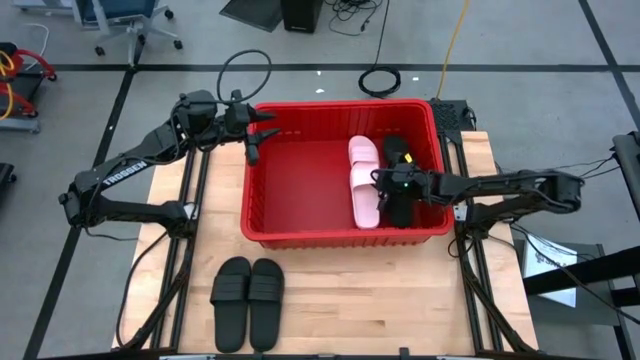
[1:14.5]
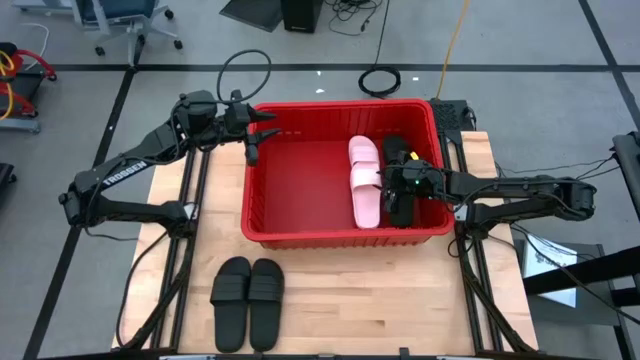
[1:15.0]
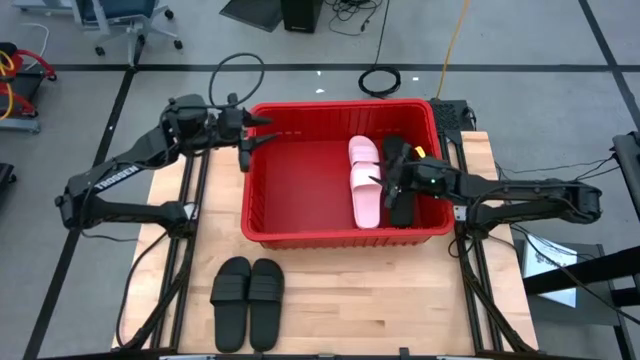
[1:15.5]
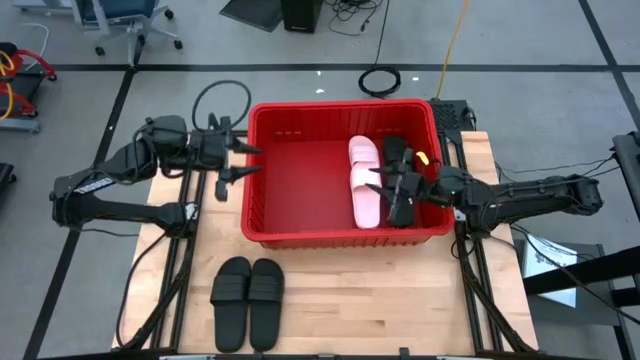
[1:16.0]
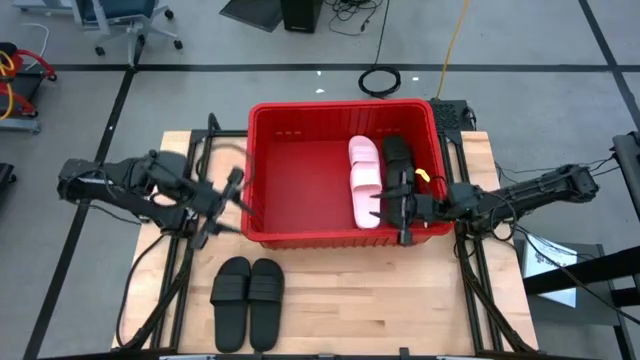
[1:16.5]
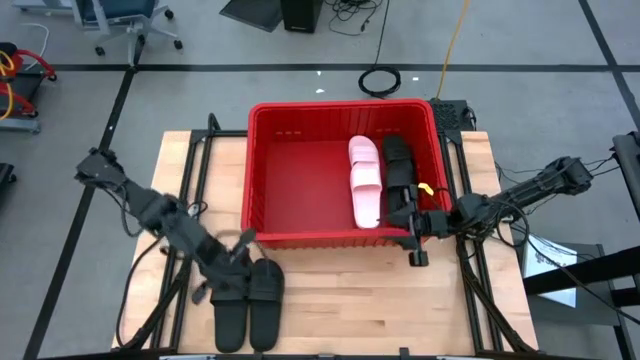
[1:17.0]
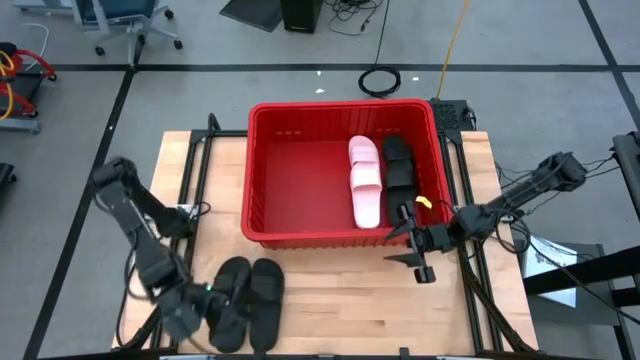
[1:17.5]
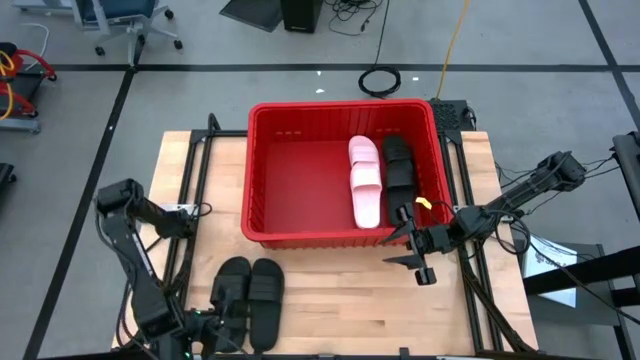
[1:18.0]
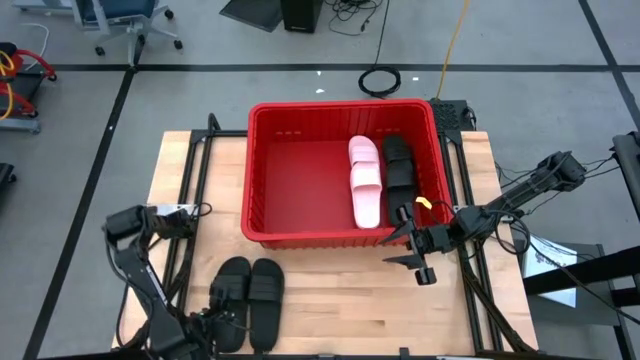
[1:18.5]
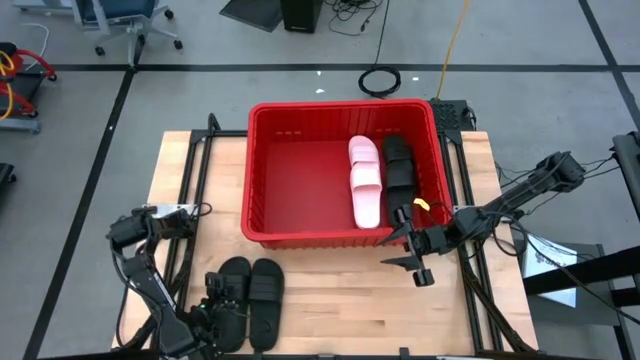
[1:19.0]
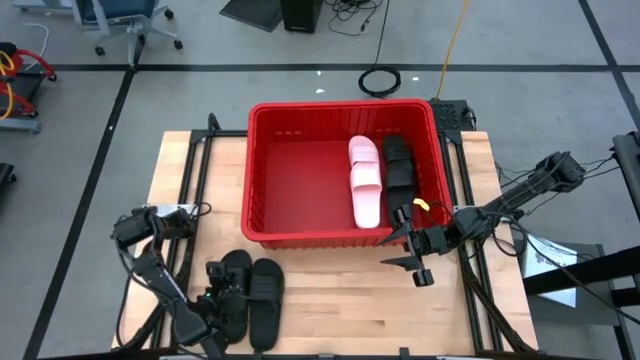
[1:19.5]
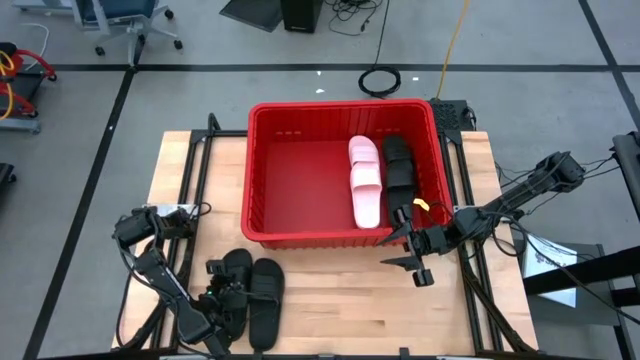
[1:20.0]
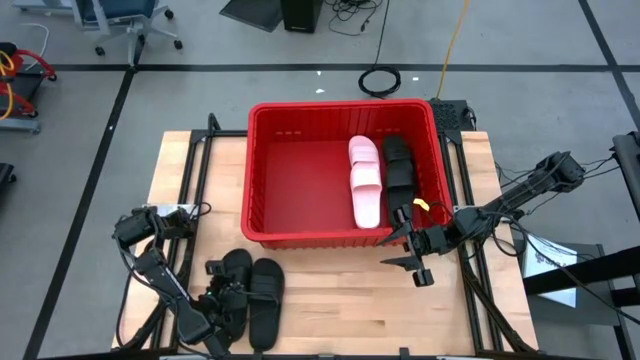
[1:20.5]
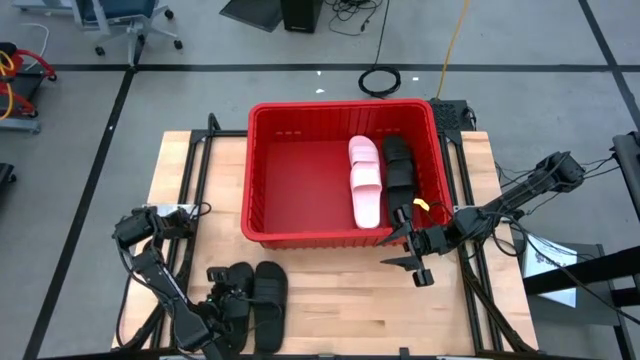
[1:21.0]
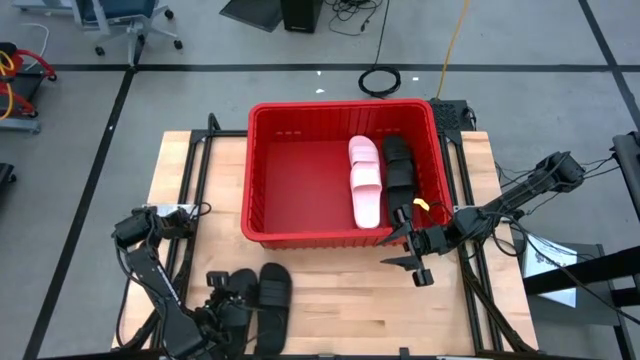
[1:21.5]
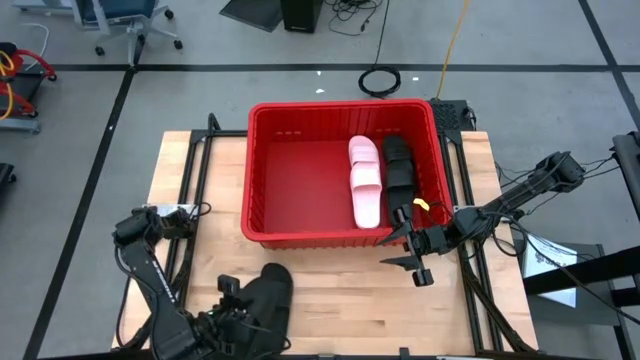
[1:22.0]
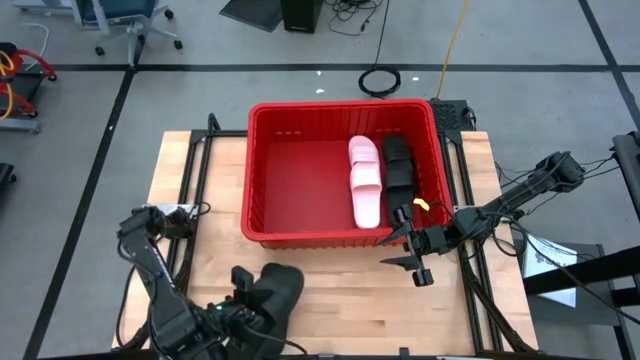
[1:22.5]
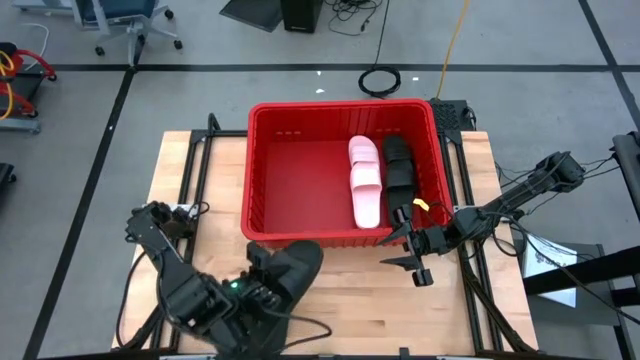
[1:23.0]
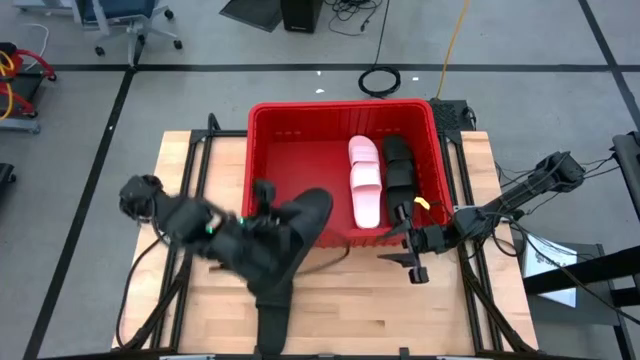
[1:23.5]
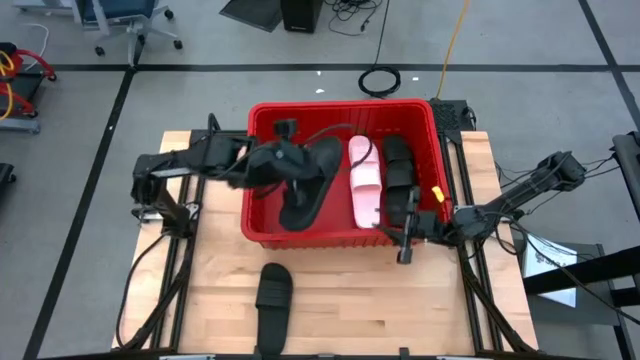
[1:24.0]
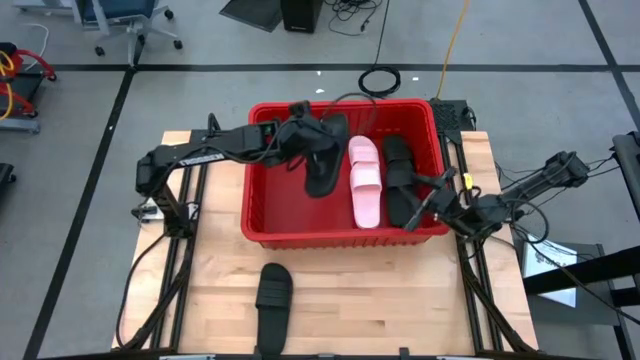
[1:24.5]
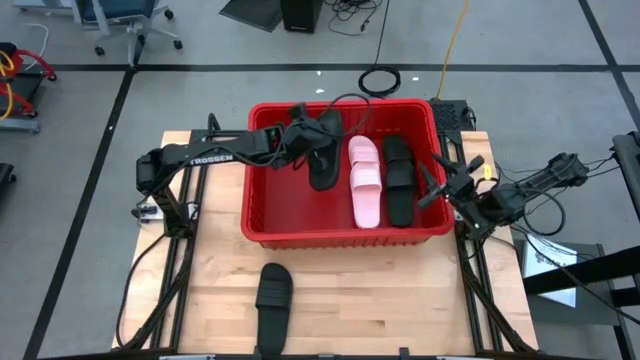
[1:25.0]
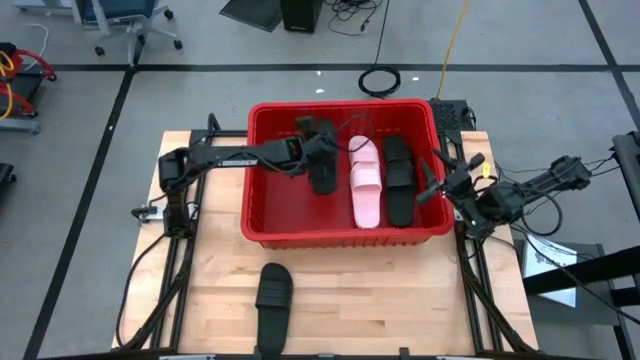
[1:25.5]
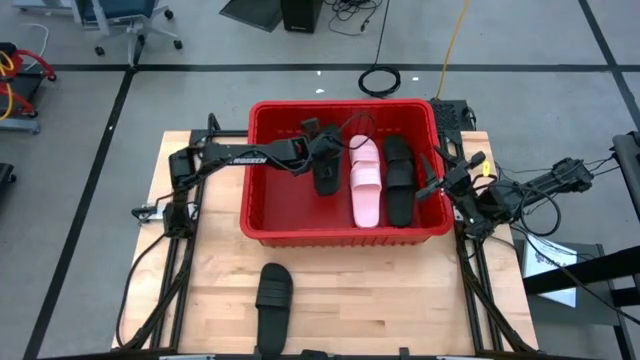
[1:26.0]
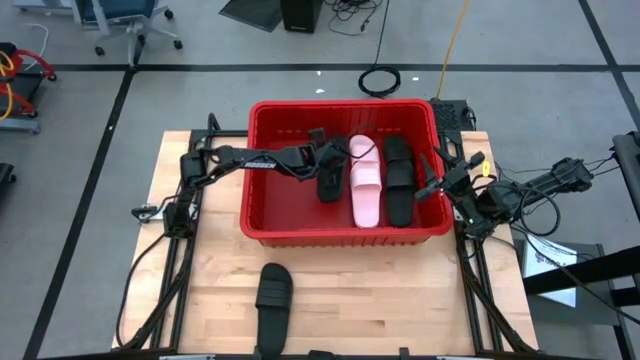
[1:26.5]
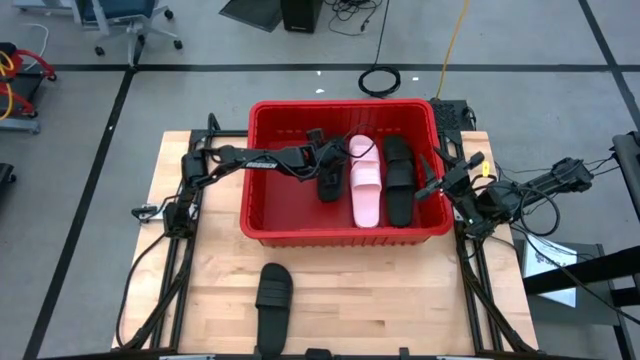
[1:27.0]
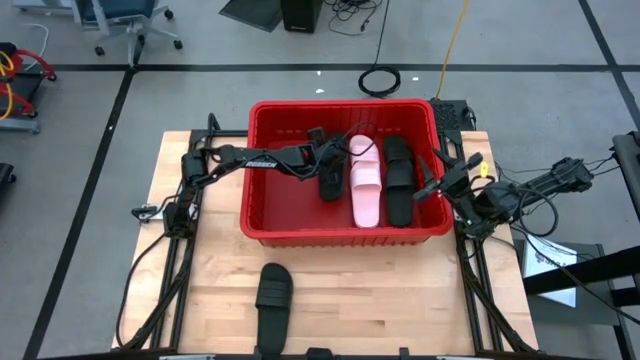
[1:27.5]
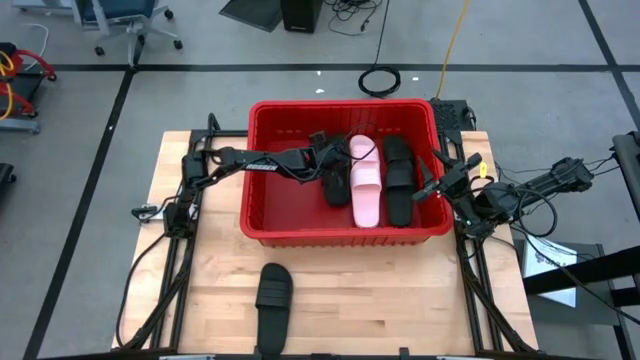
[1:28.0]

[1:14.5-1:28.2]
Task: Pick and place slides into bin
Put the black slide into the red organizer bin

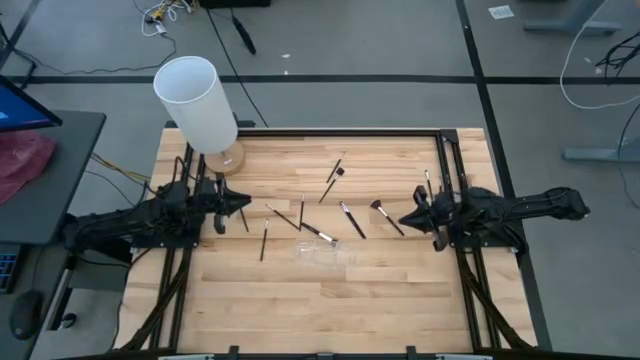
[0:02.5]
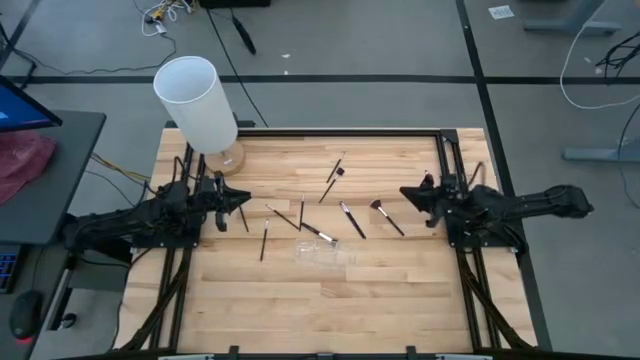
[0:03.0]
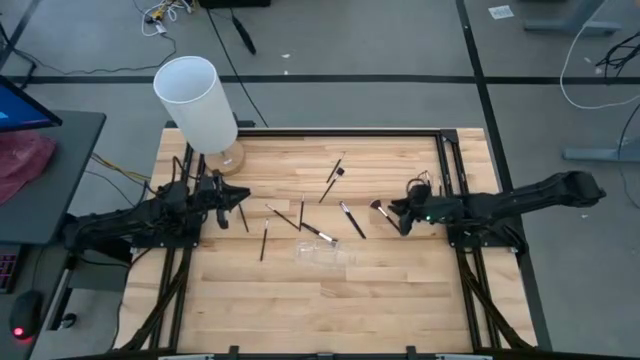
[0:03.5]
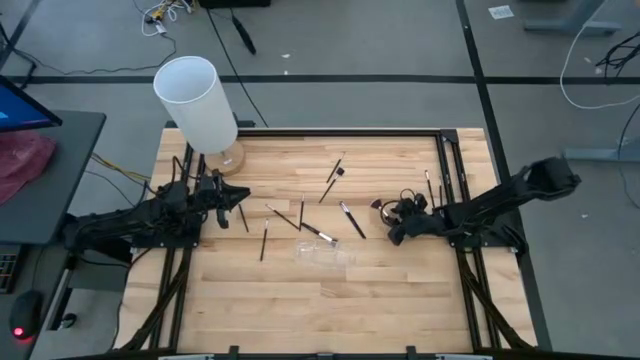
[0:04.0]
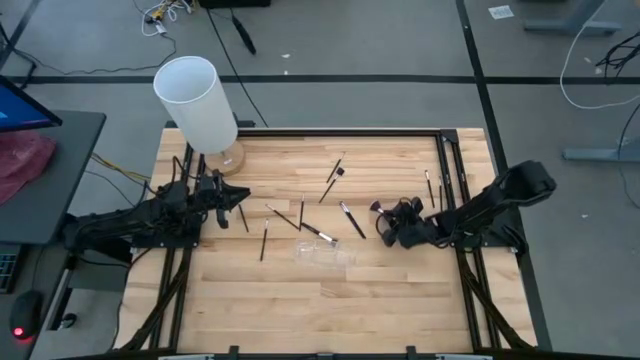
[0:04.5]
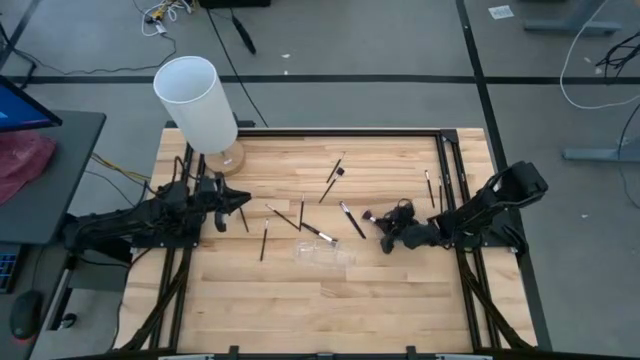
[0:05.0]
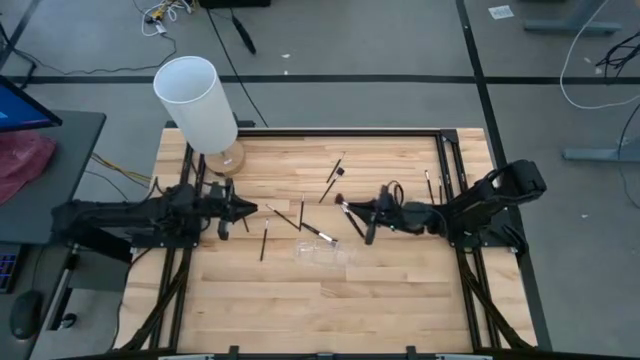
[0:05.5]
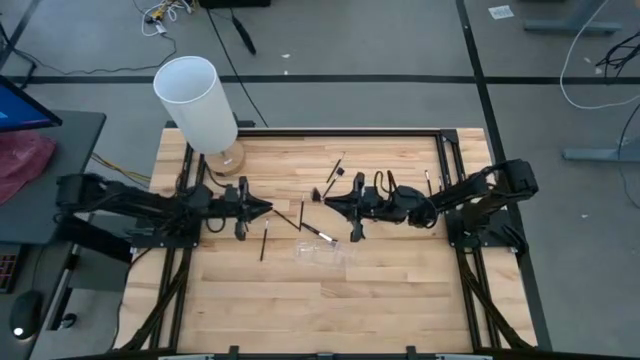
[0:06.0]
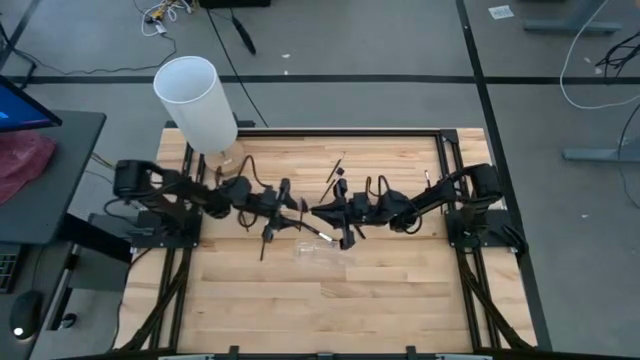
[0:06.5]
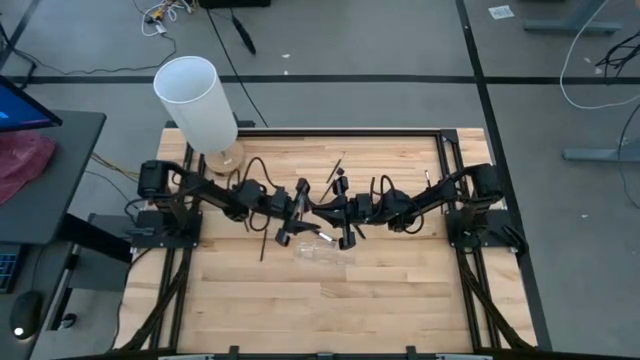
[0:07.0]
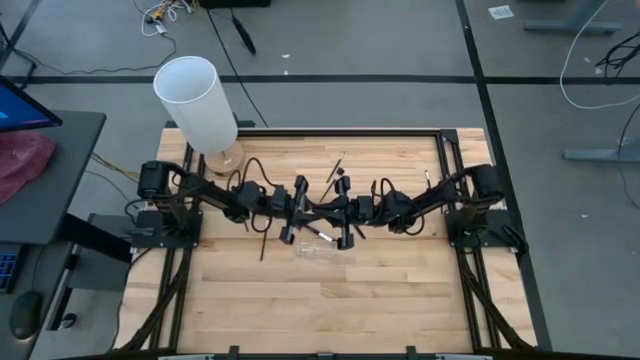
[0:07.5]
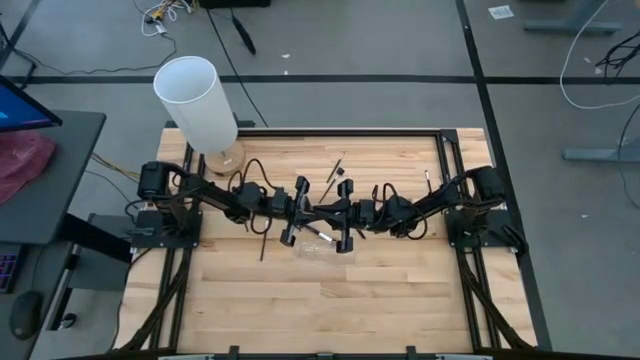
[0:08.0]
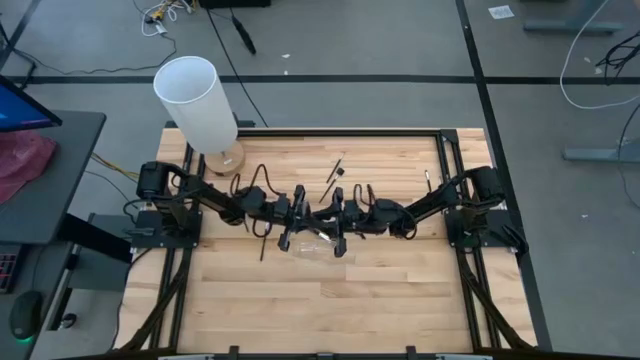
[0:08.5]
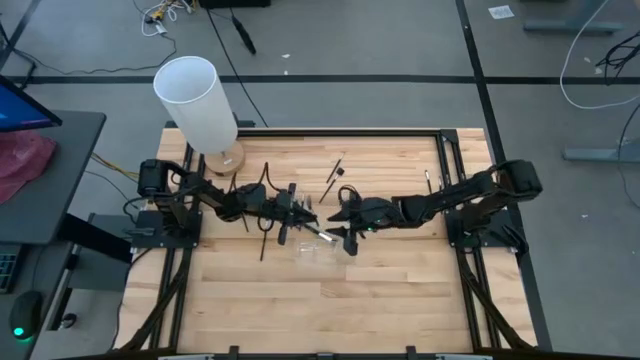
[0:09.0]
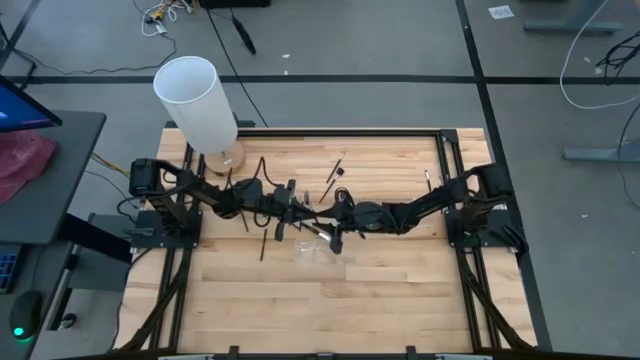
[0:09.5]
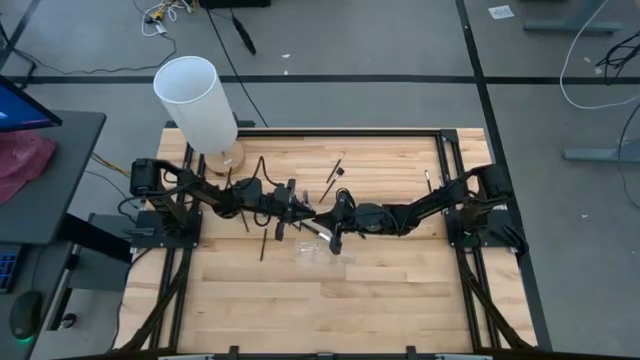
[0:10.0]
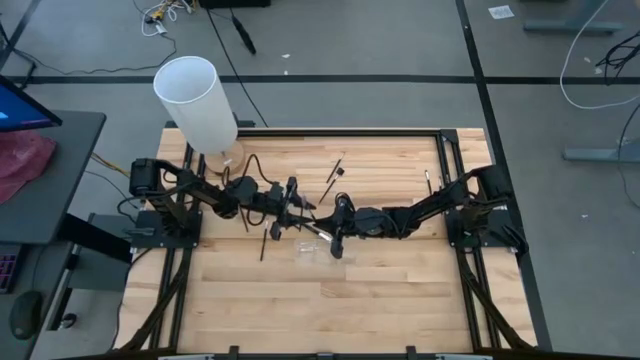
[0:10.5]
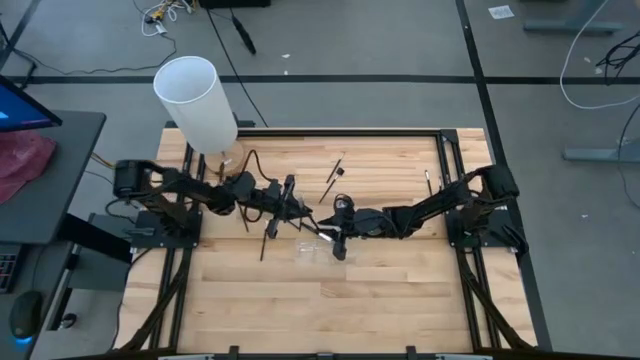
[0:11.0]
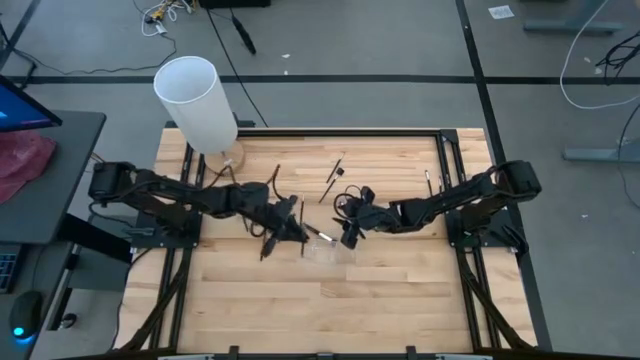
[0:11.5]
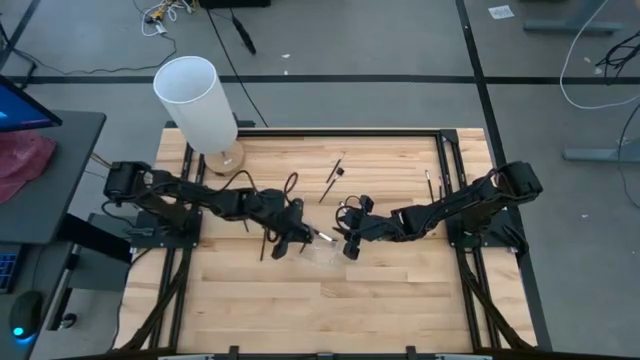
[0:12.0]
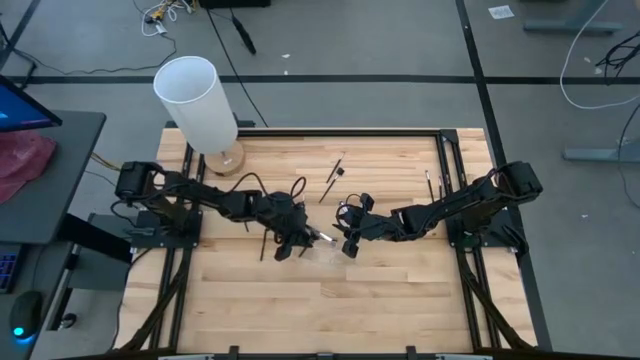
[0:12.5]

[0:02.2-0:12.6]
Task: Put items in baskets/containers
Put the black highlighter brush into the transparent organizer
